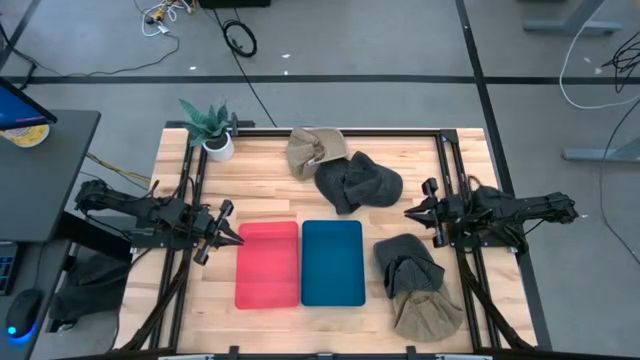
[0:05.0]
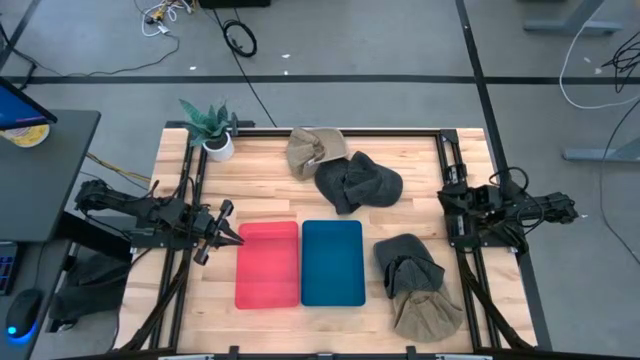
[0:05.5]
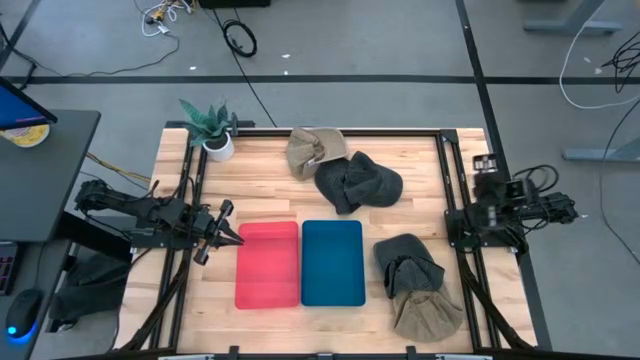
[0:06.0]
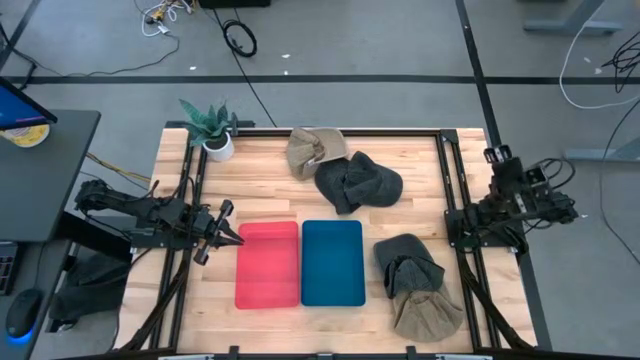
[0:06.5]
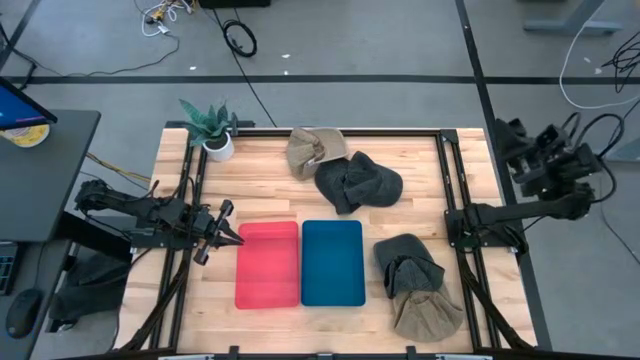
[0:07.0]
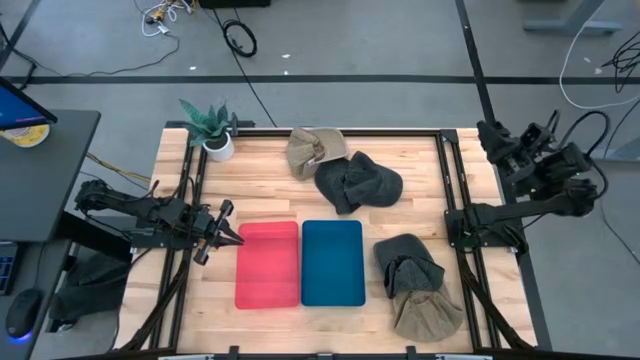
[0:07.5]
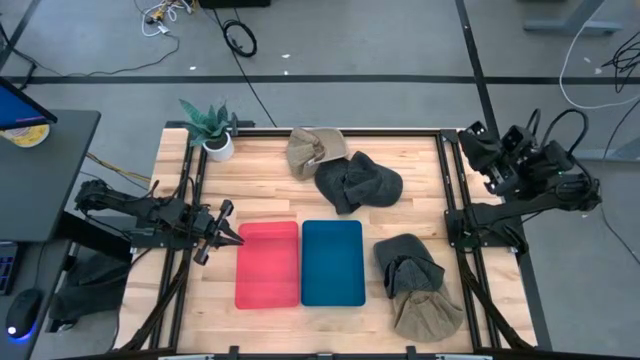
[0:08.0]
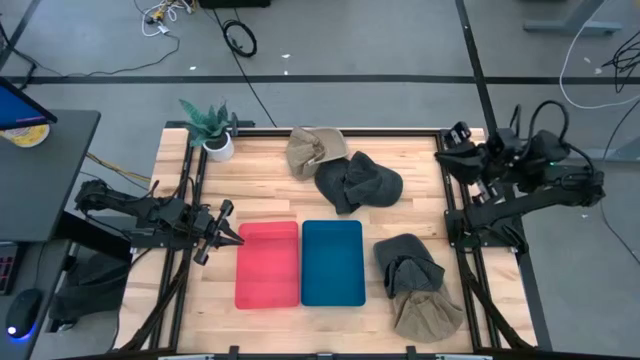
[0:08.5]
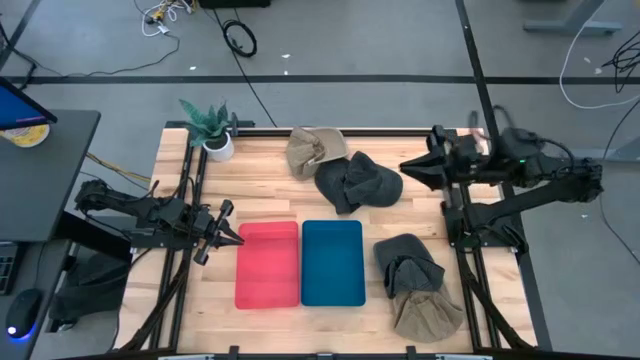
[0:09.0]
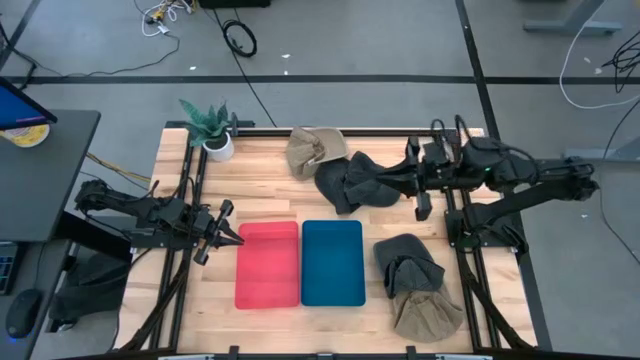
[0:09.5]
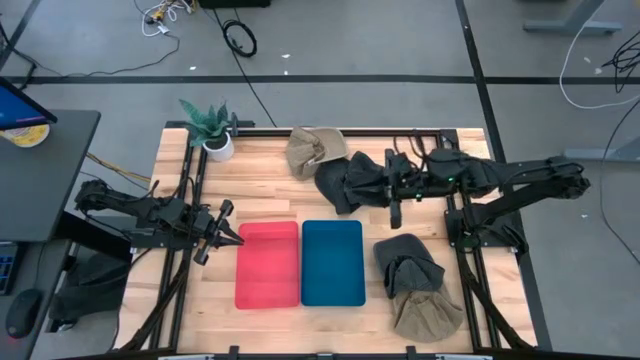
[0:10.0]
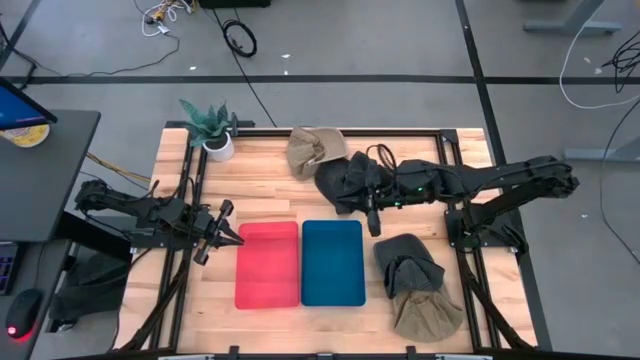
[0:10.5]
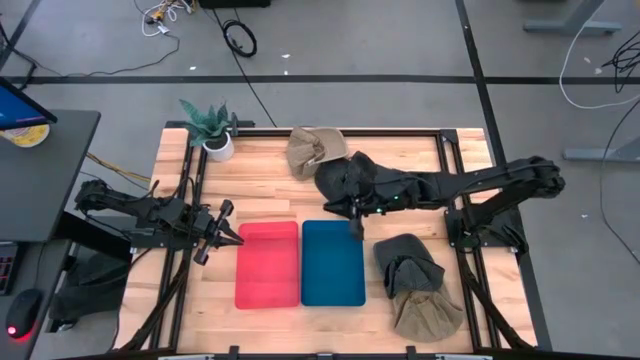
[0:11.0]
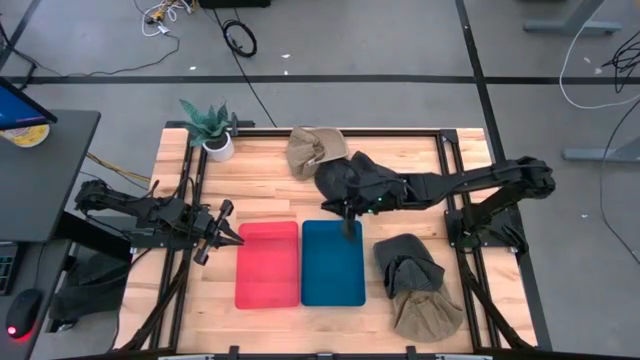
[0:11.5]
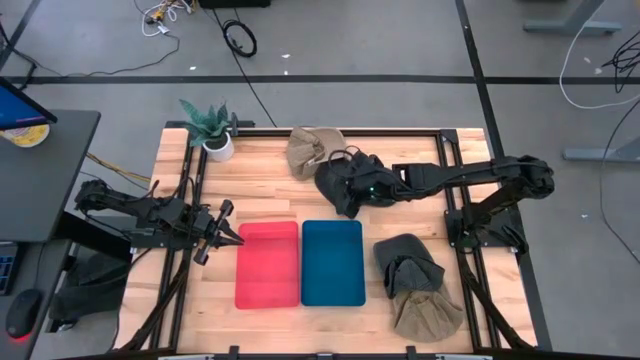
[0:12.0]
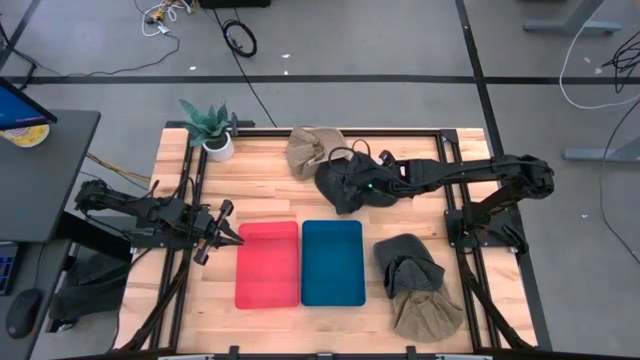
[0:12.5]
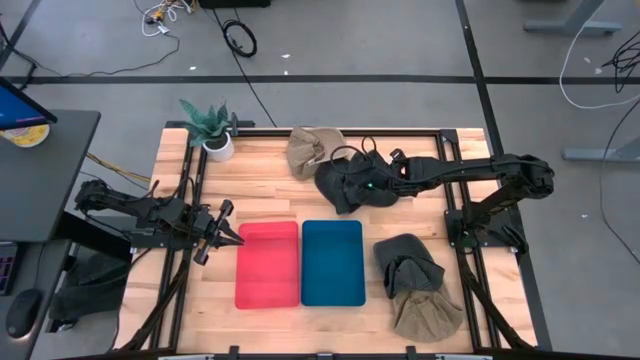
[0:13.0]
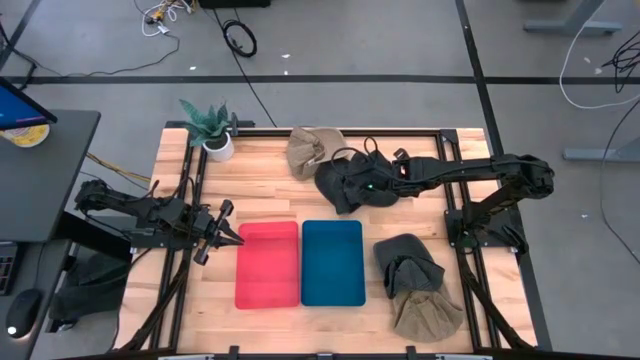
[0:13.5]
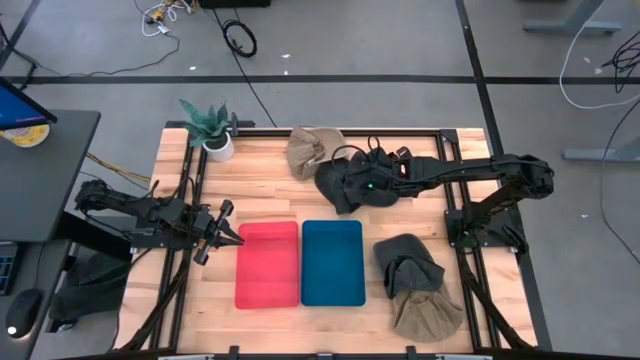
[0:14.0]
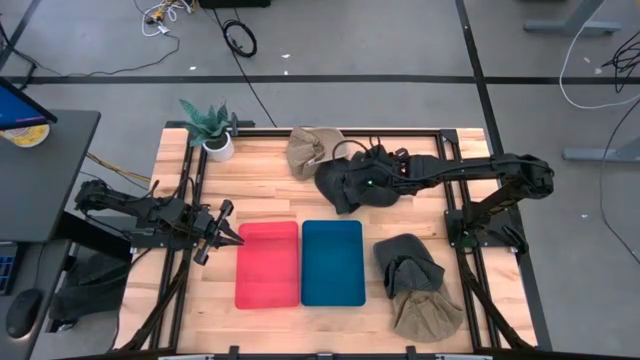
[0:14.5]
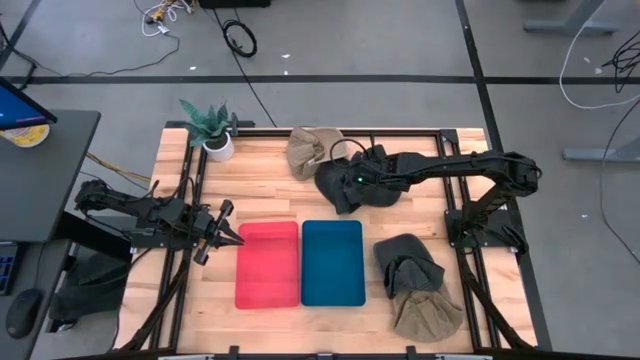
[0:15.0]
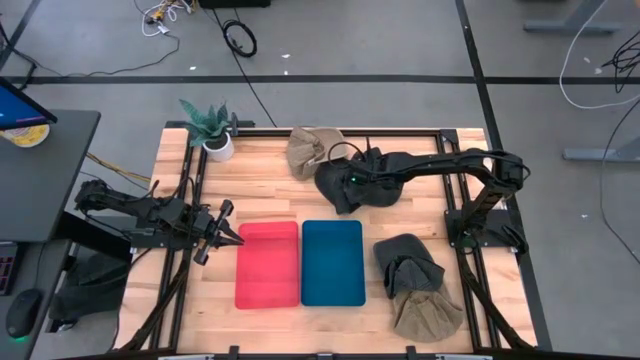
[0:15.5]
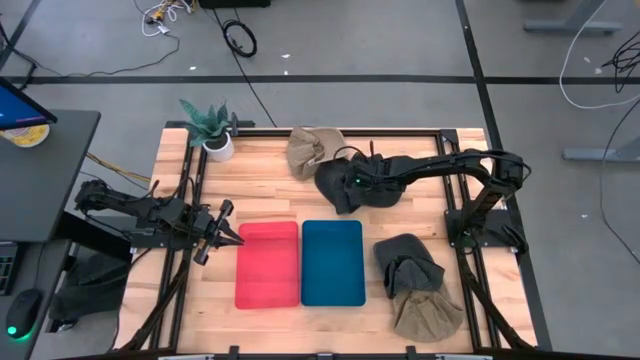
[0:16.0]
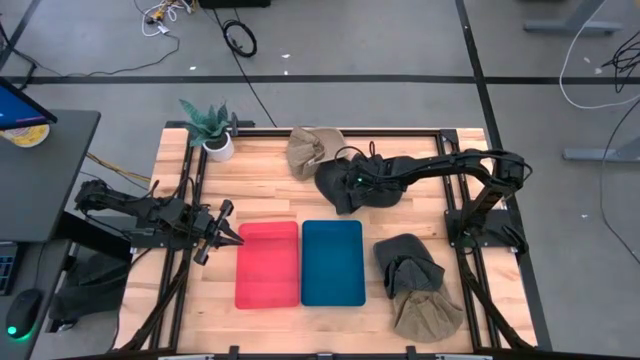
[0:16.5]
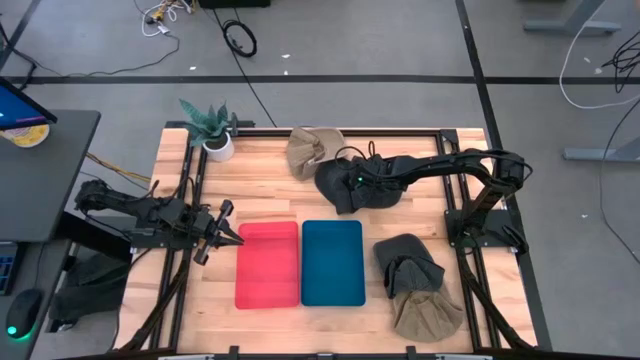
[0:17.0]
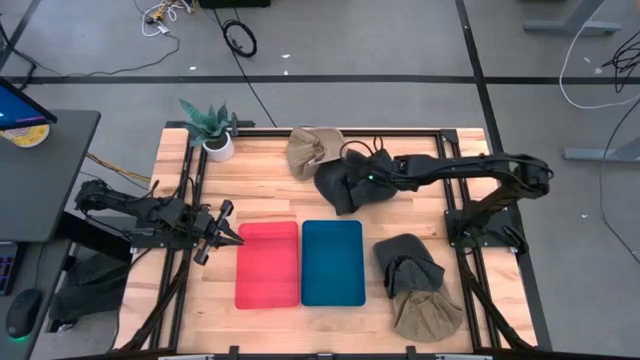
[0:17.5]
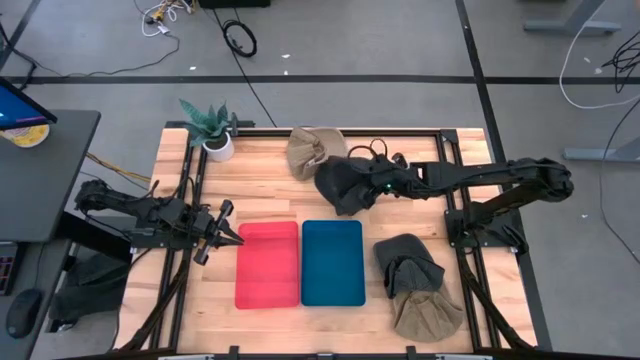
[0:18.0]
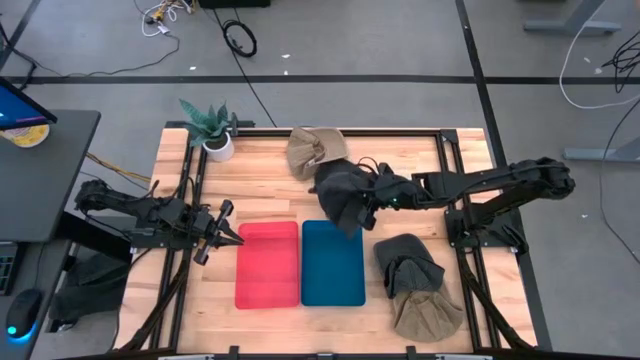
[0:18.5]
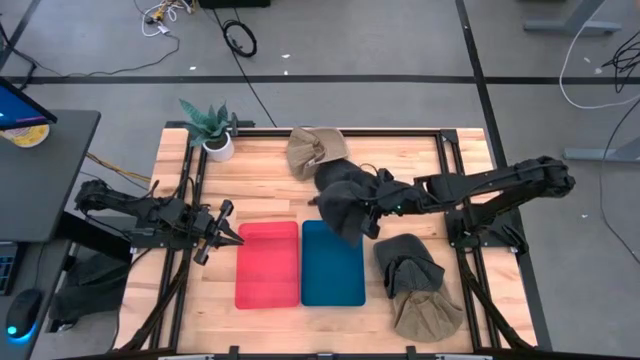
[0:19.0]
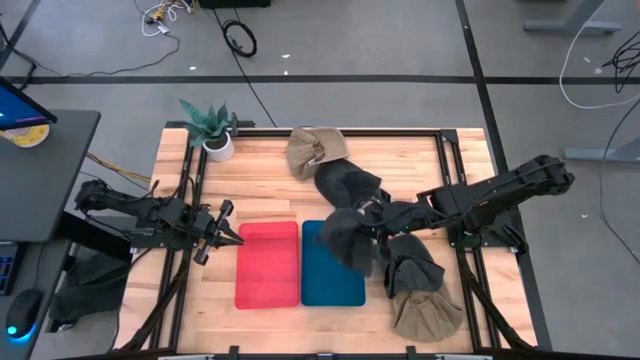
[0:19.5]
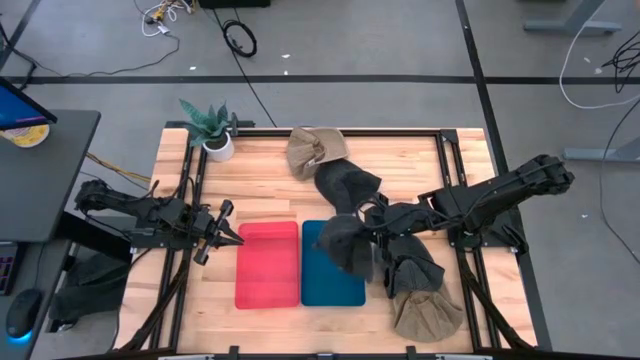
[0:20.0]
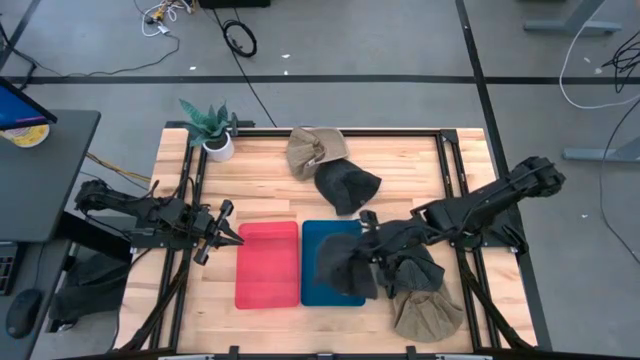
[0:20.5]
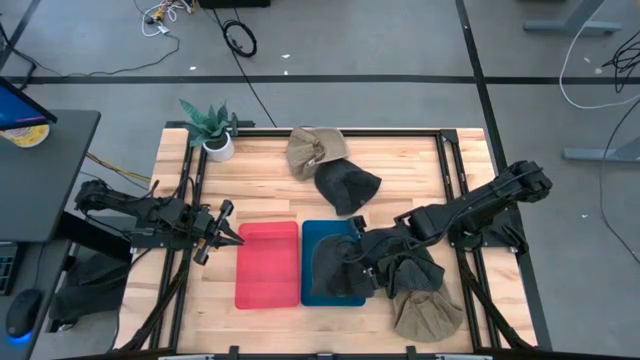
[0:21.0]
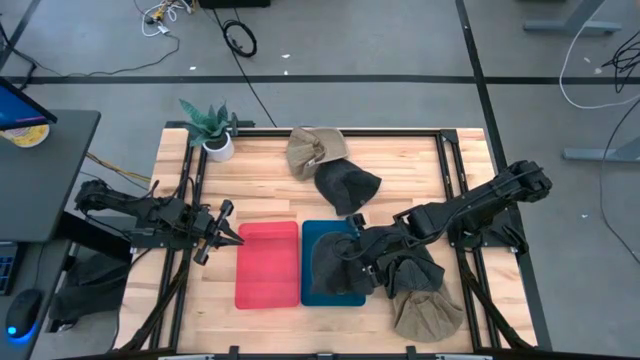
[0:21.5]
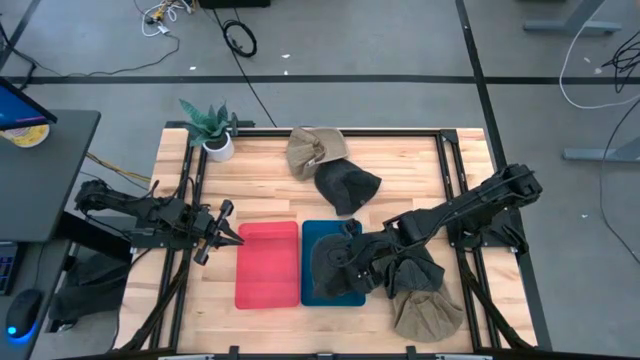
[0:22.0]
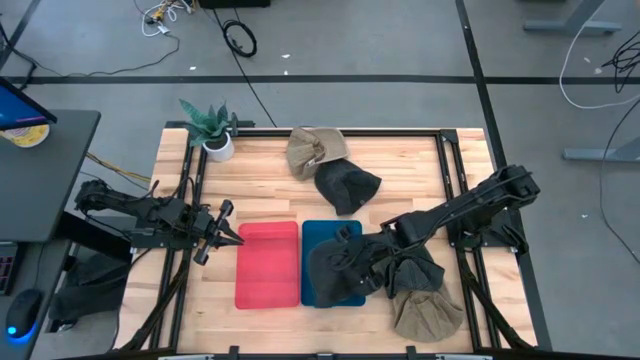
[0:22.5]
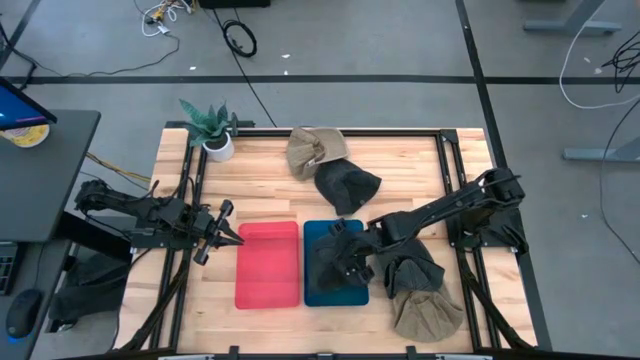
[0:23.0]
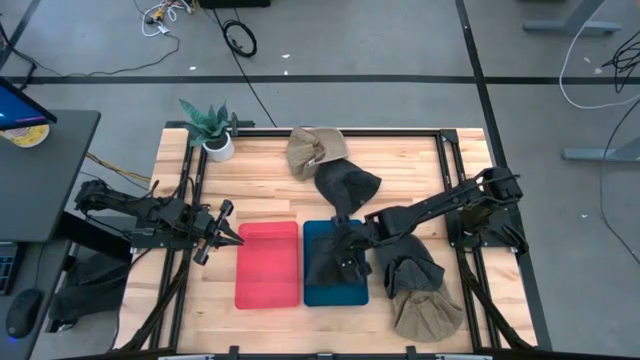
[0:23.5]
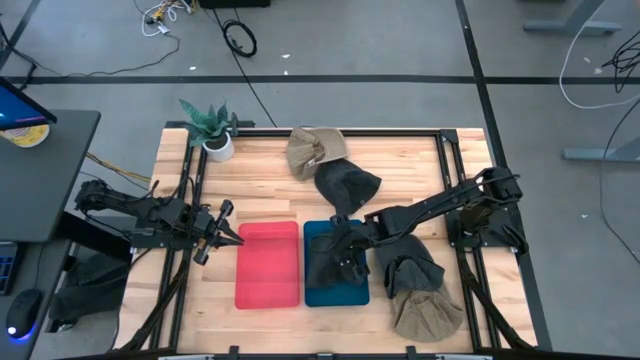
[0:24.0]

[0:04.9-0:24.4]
Task: Pick & Place hat
Put the top right black cap into the blue bin

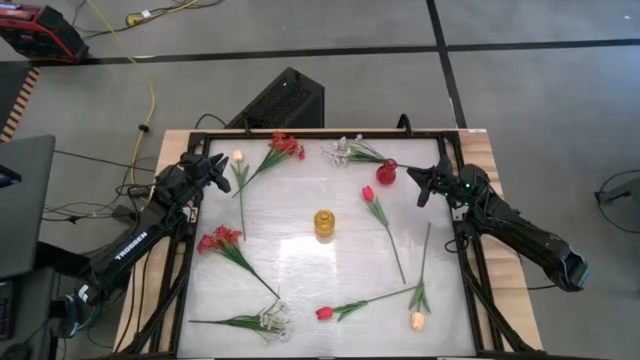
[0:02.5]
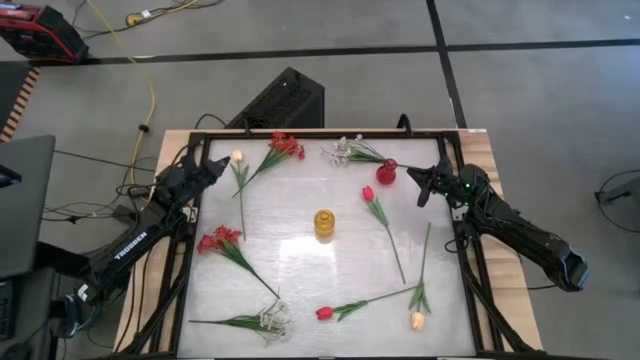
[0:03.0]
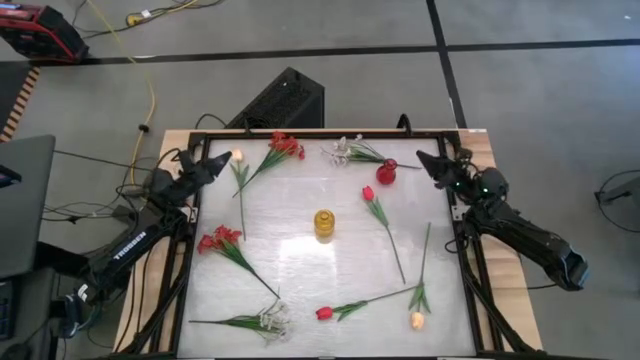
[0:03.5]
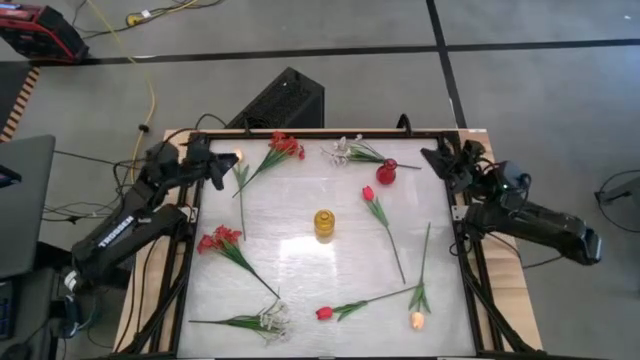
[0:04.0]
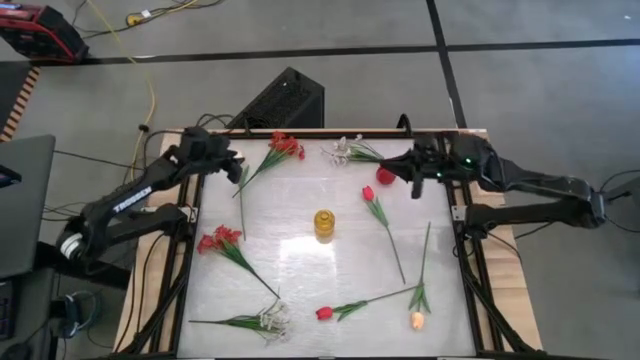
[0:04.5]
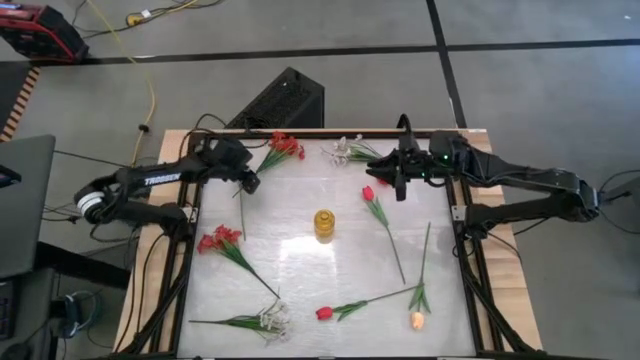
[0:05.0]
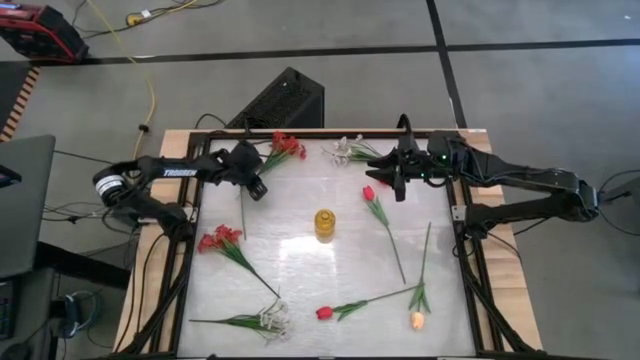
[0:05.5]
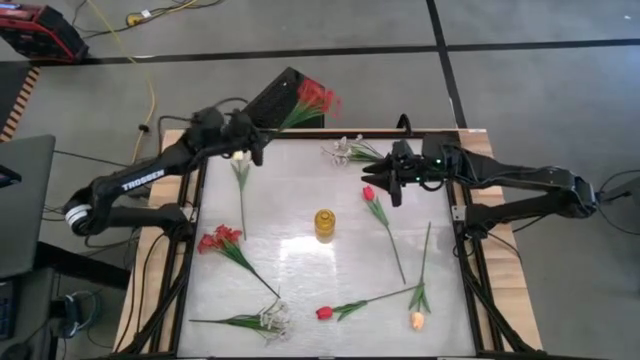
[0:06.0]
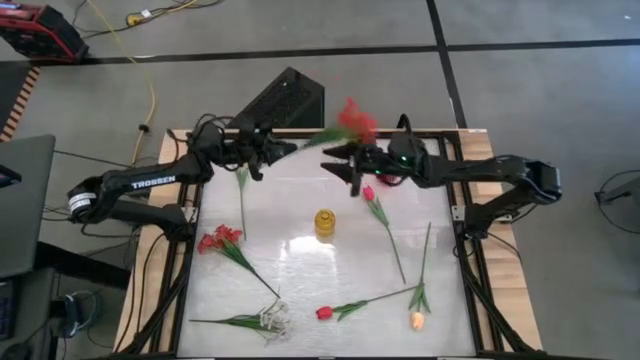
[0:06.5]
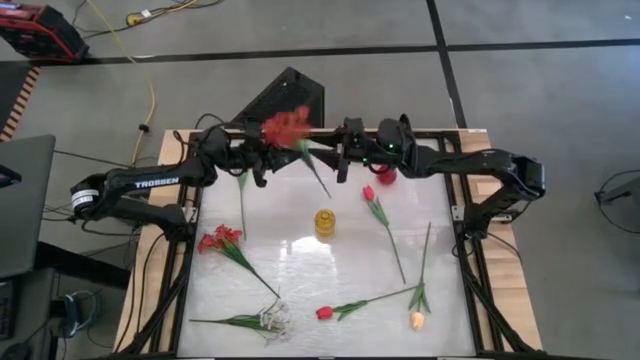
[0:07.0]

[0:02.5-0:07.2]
Task: Sort flowers into vase by color
Put the top red flowers into the red vase
